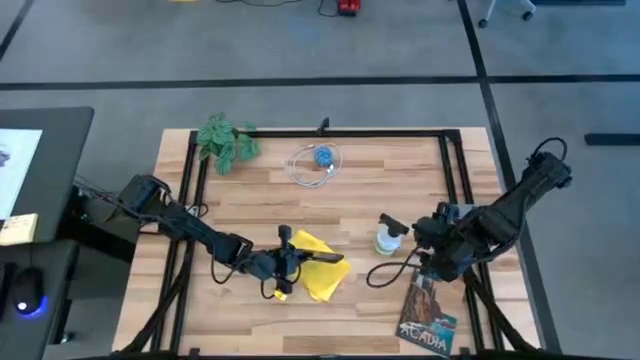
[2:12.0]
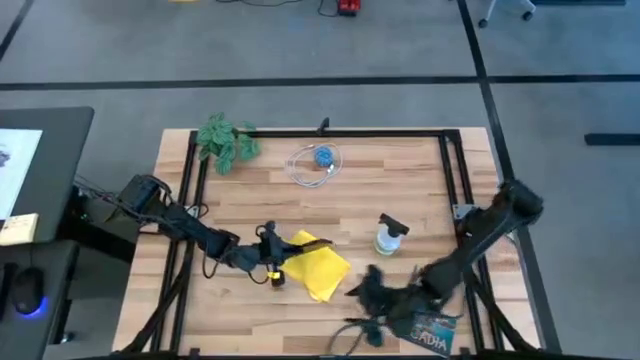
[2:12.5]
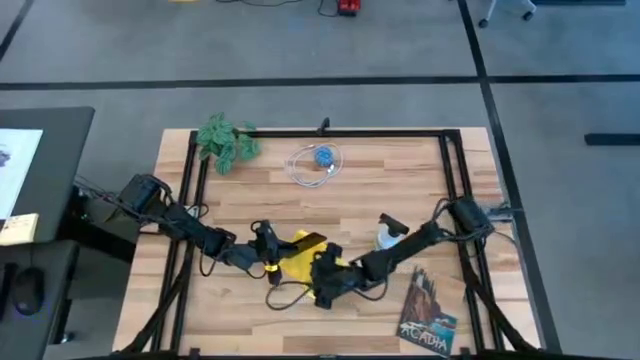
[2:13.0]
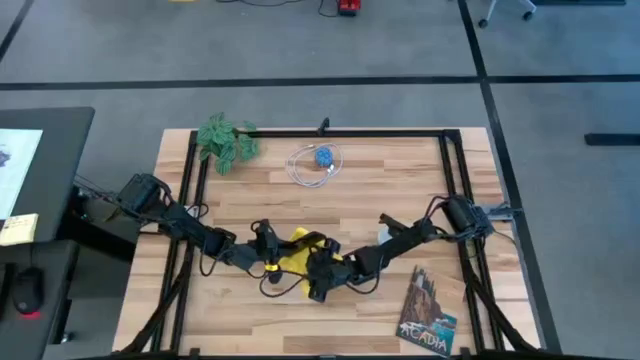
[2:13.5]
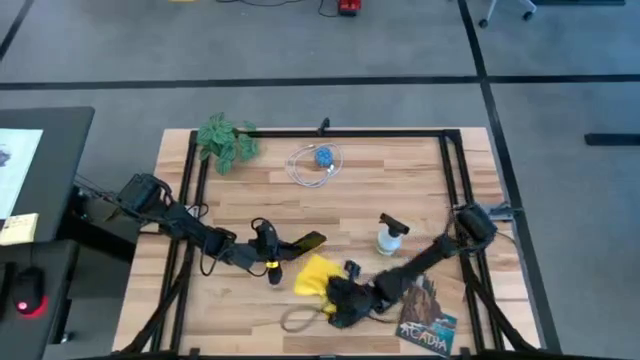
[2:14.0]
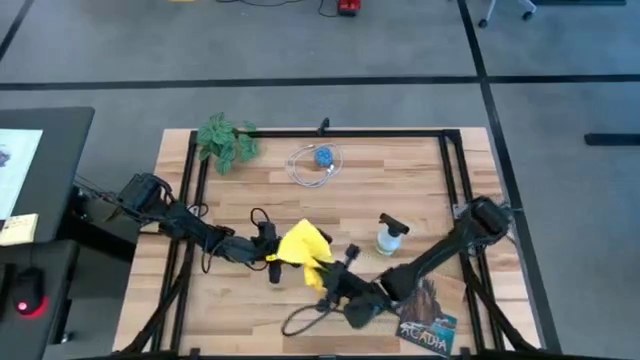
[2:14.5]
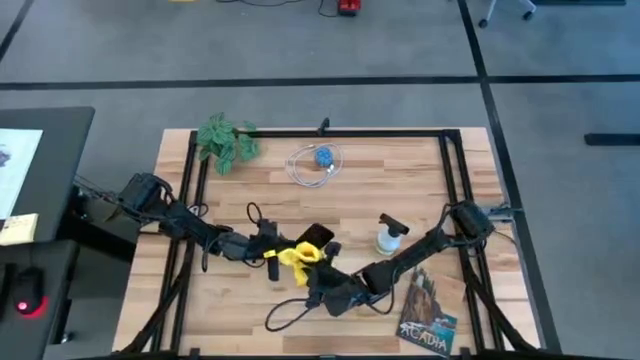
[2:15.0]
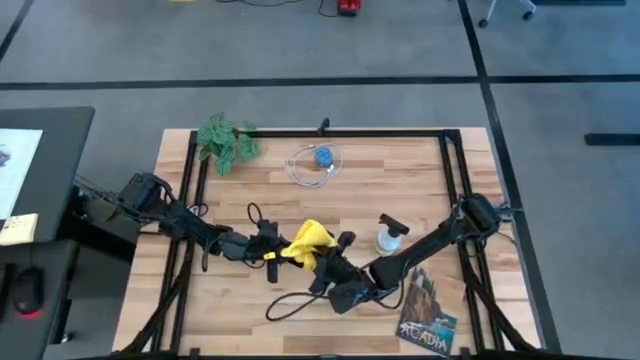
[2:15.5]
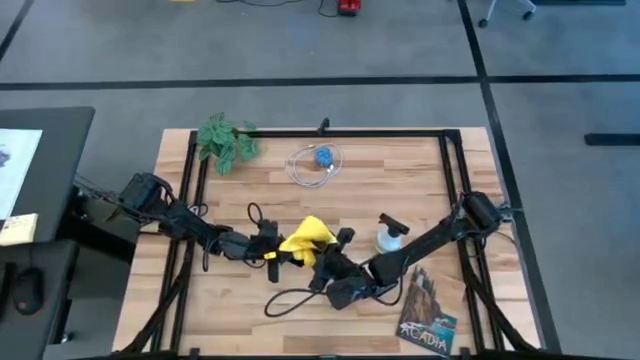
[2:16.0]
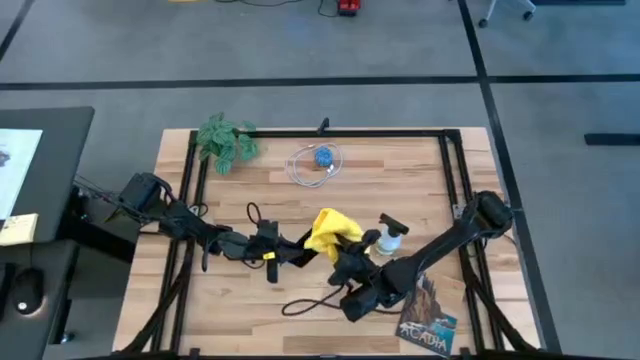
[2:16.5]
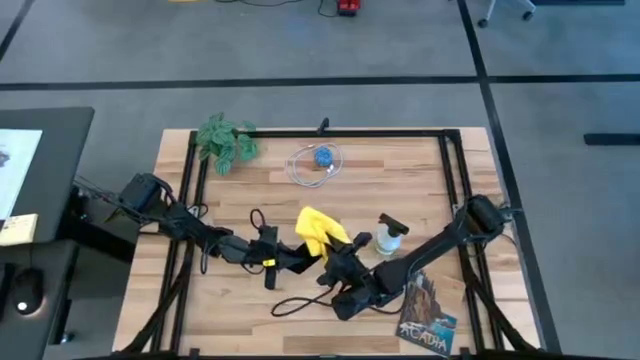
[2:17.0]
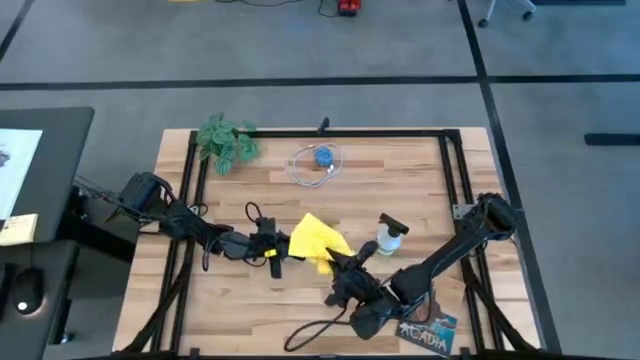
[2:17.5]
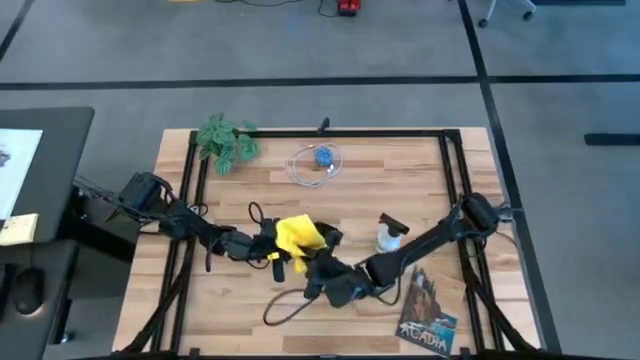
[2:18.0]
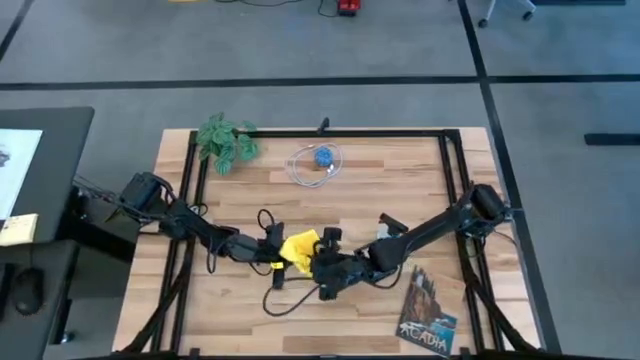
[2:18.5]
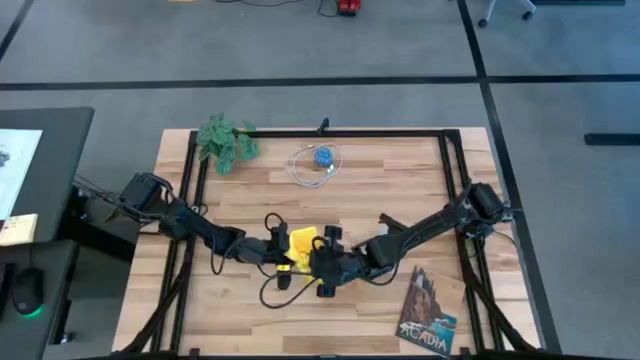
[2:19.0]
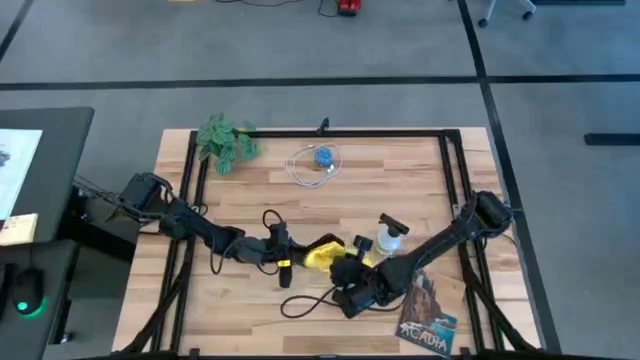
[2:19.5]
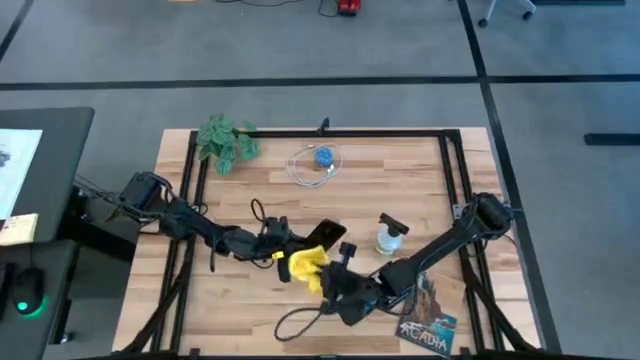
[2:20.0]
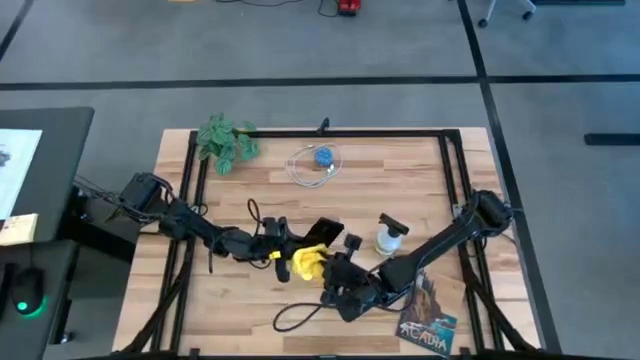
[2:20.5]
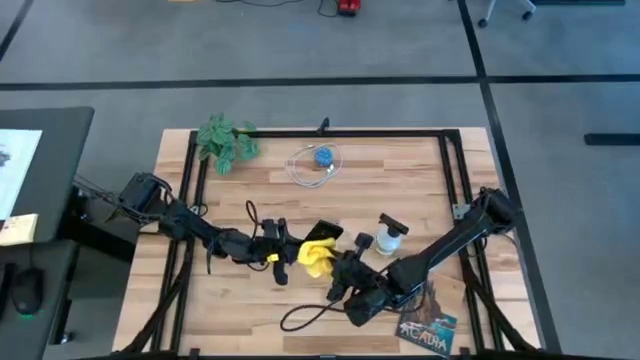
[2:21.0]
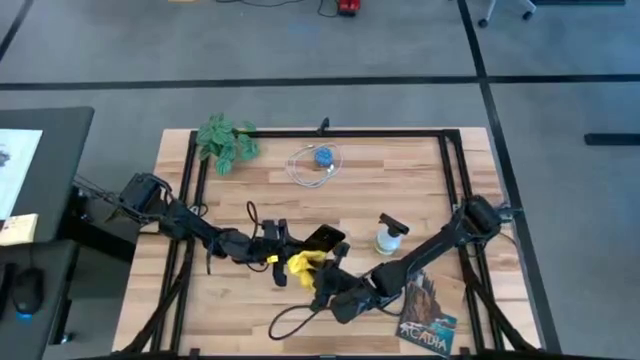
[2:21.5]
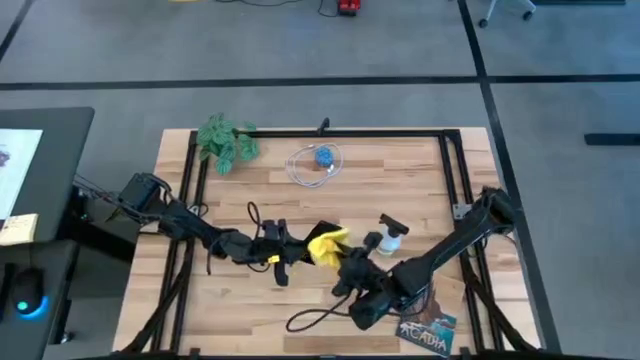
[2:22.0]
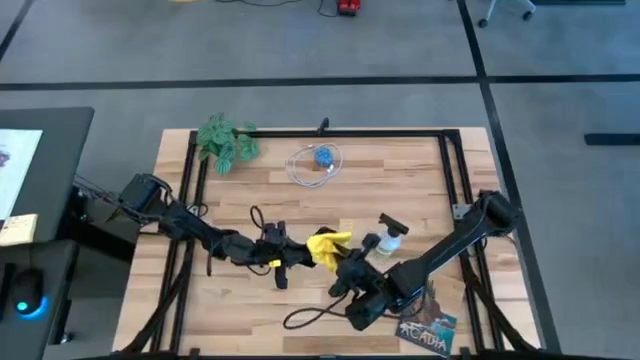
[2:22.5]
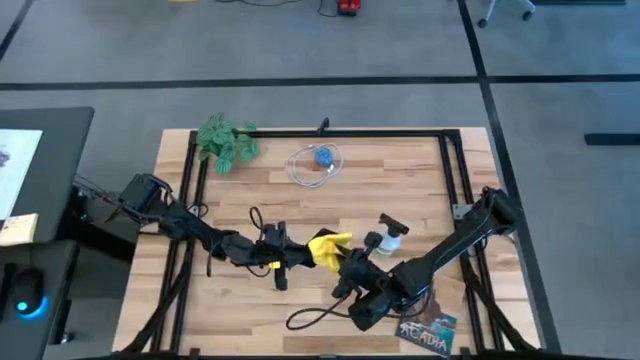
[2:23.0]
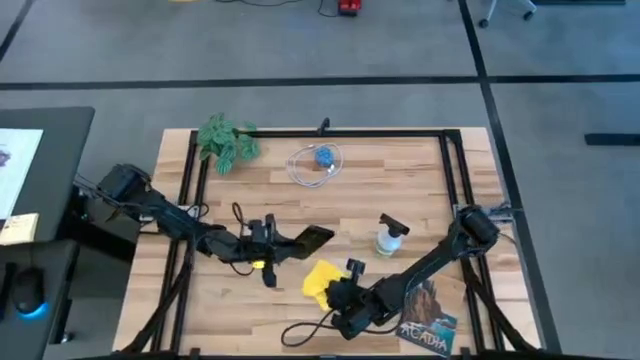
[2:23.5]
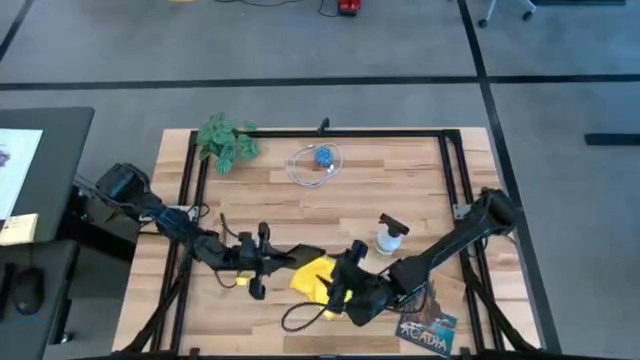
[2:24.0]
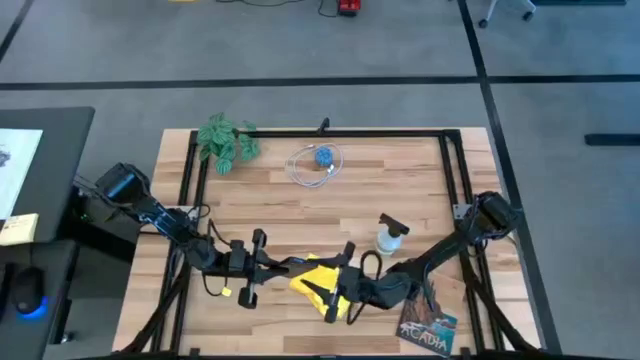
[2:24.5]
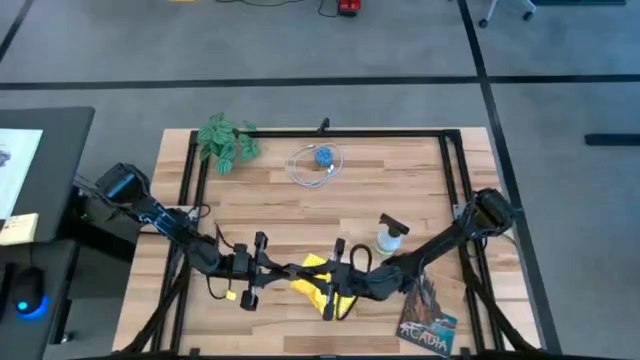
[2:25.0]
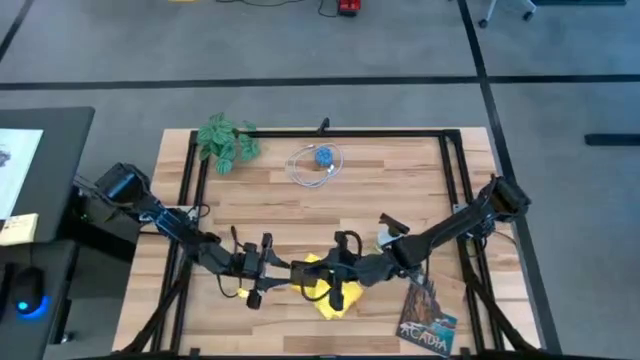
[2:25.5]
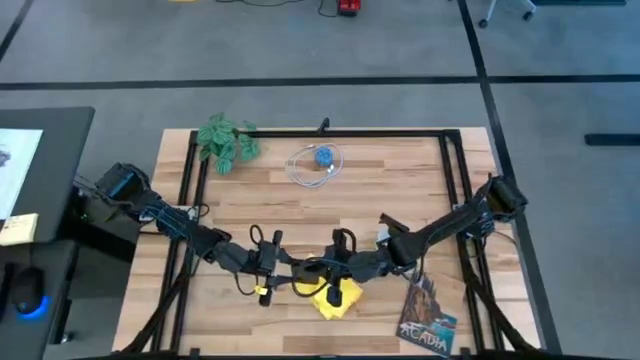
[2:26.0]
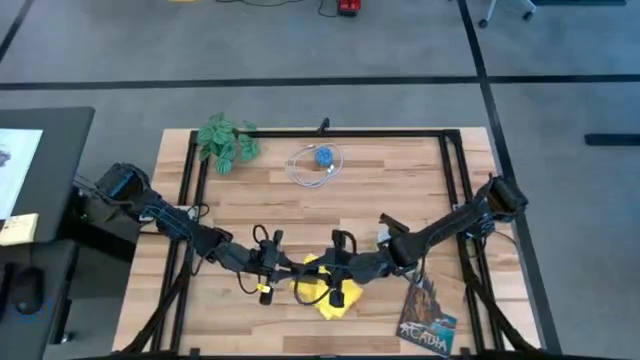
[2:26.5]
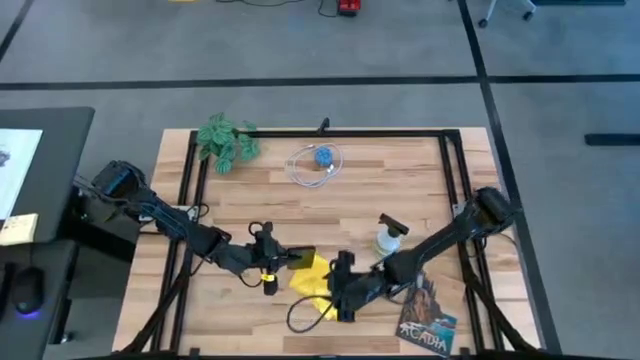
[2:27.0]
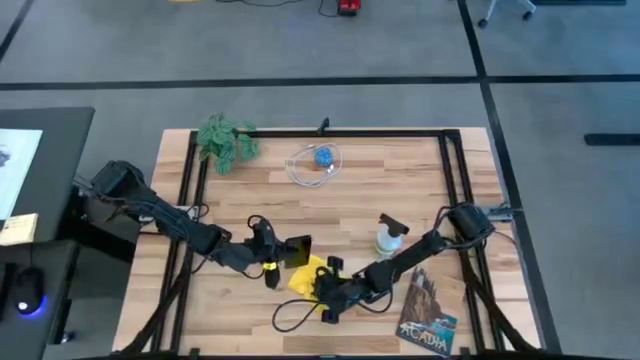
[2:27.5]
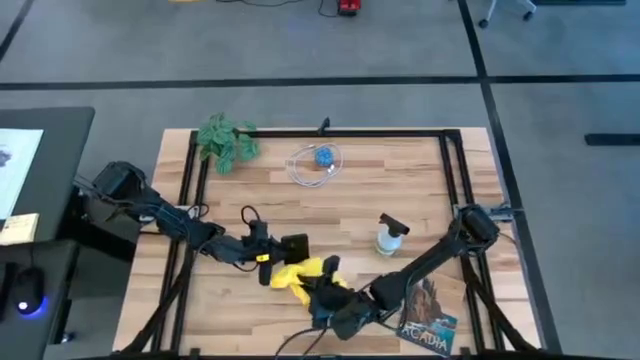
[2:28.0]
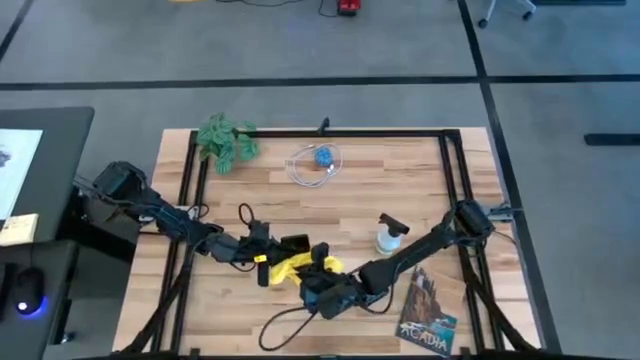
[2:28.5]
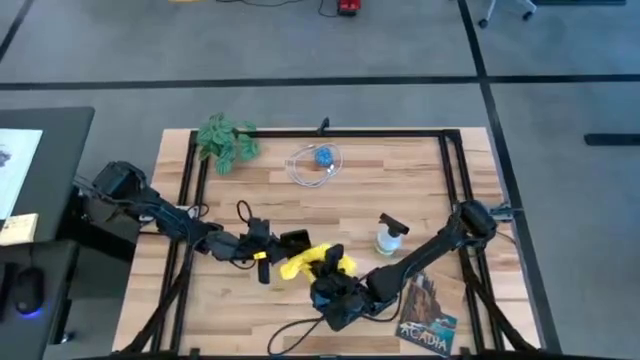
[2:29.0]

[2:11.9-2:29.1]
Task: Apply microfiber cloth
Wipe the back of the cellphone using a microfiber cloth
